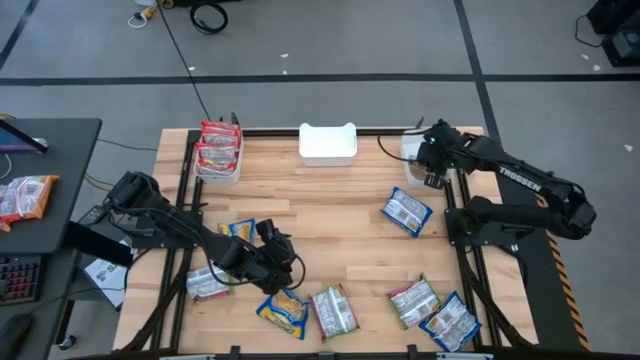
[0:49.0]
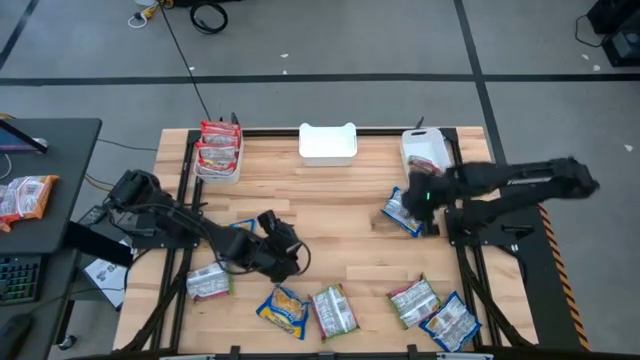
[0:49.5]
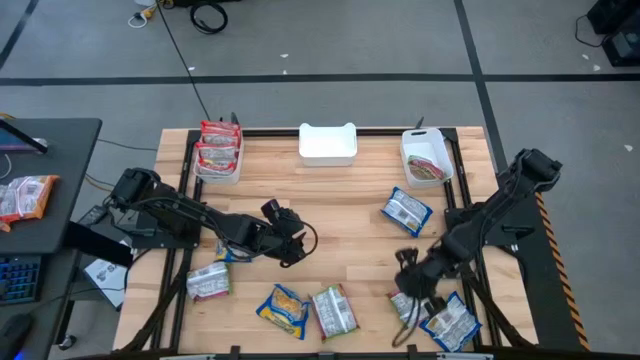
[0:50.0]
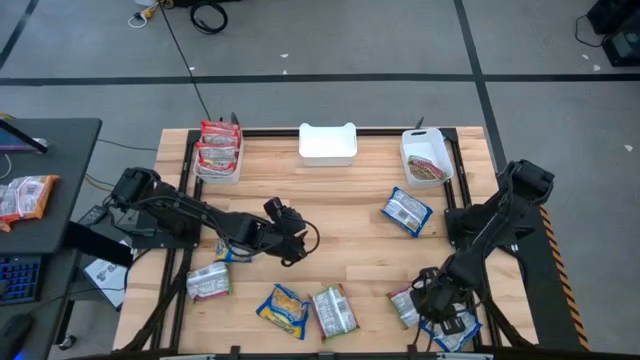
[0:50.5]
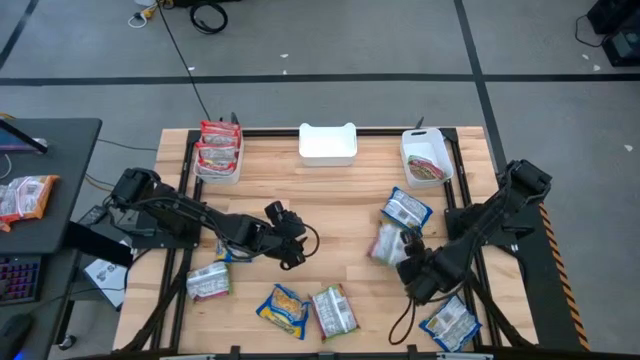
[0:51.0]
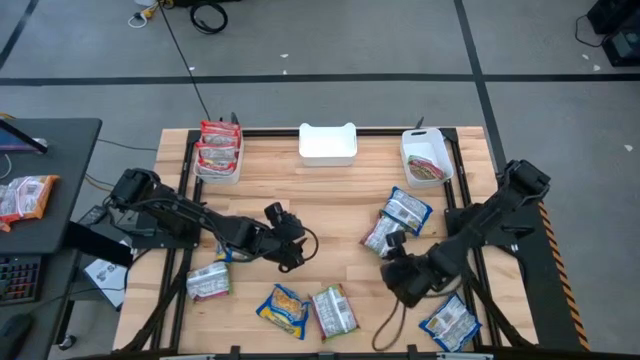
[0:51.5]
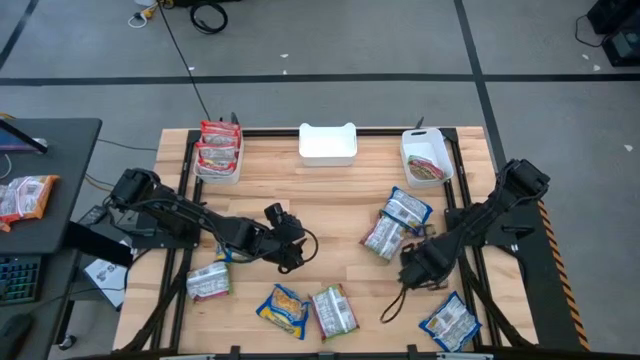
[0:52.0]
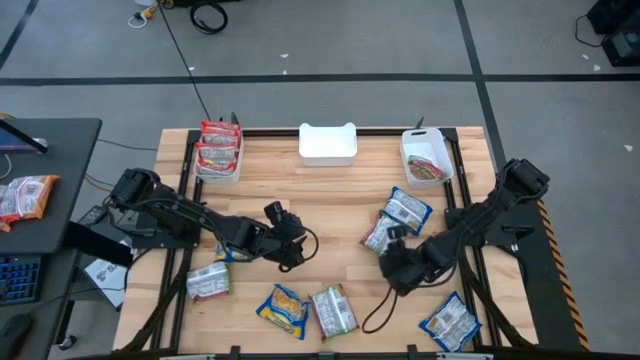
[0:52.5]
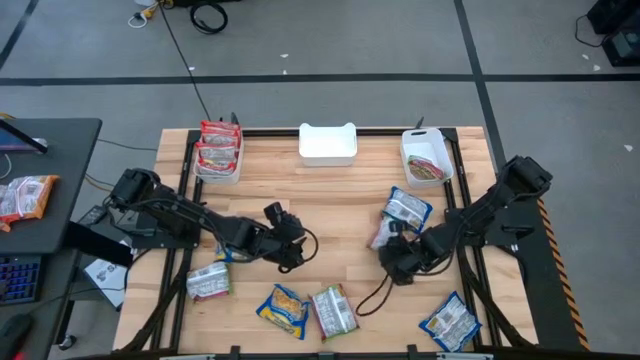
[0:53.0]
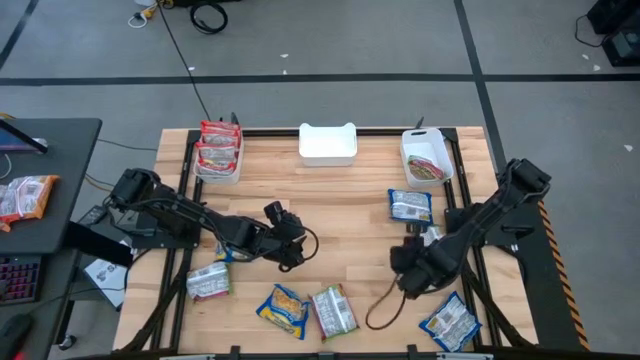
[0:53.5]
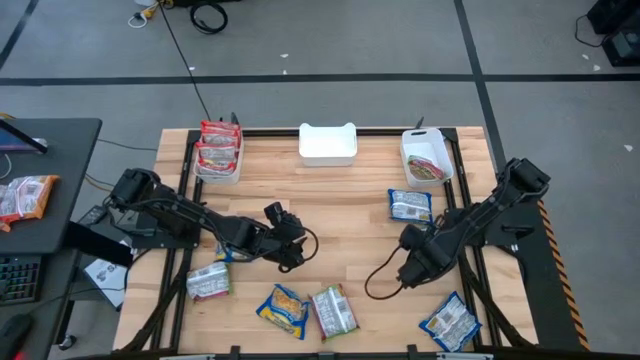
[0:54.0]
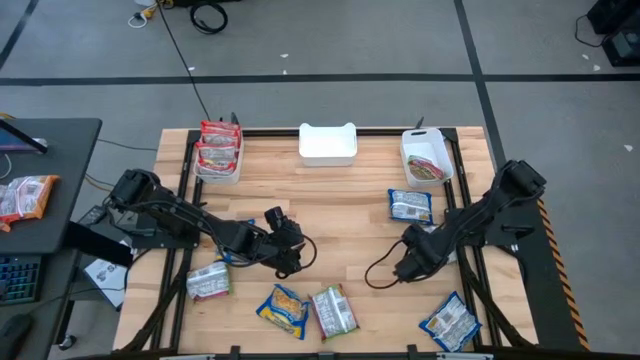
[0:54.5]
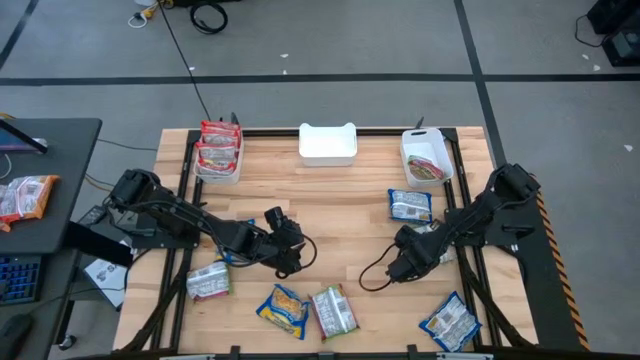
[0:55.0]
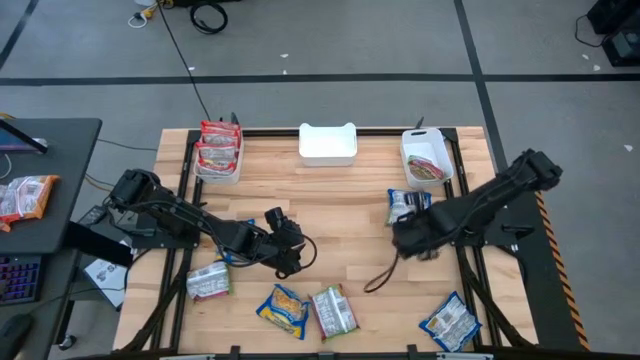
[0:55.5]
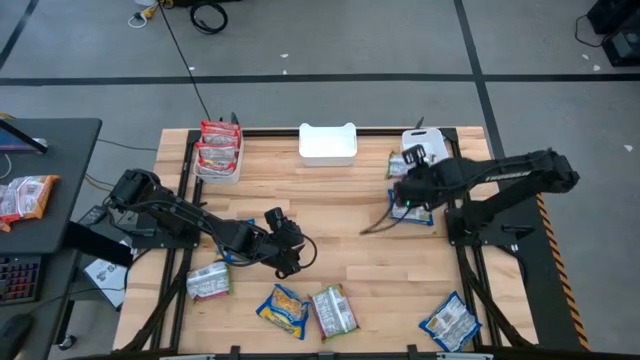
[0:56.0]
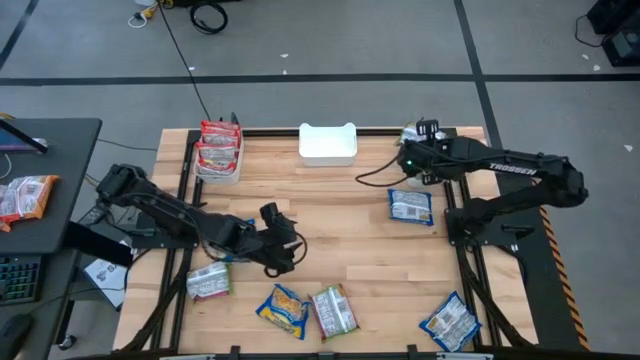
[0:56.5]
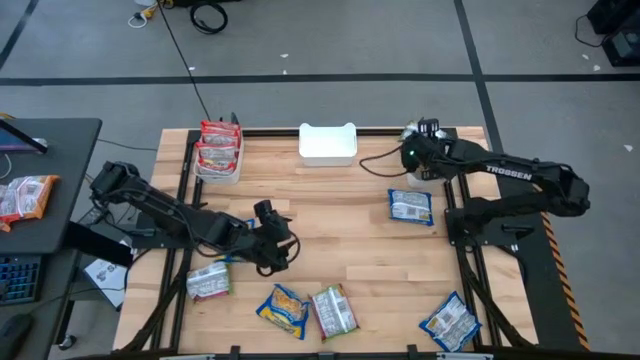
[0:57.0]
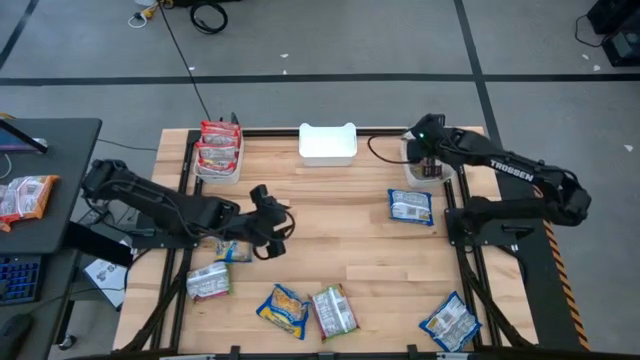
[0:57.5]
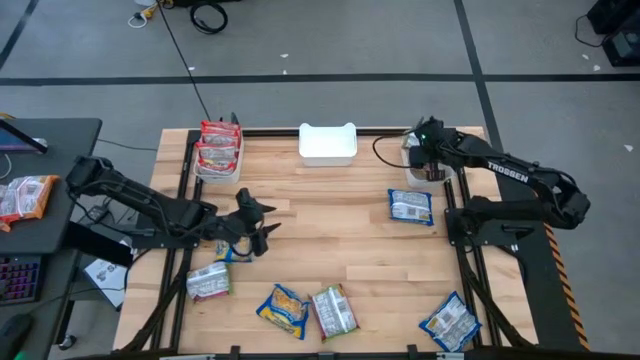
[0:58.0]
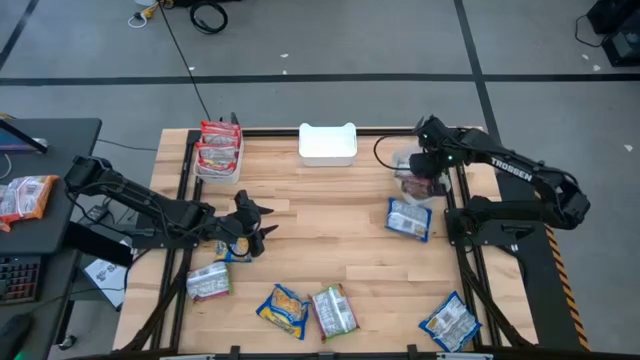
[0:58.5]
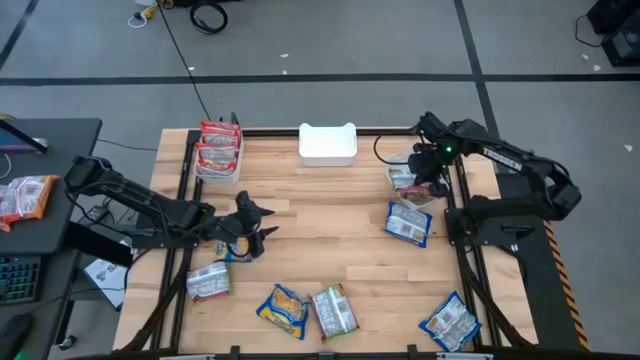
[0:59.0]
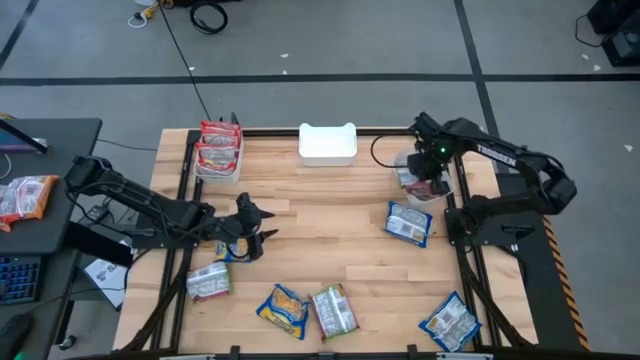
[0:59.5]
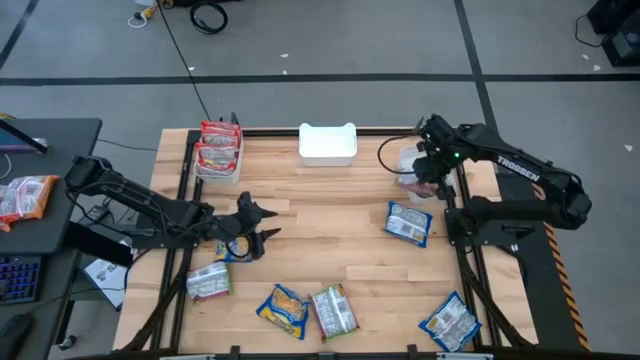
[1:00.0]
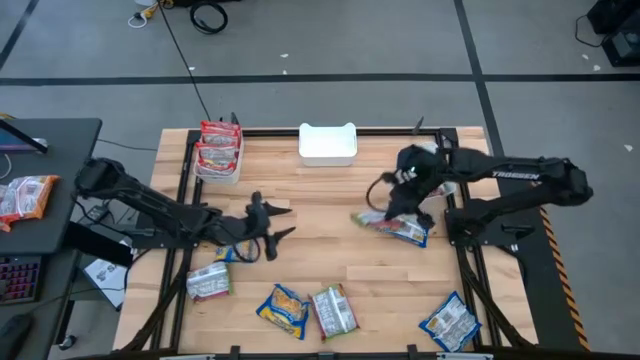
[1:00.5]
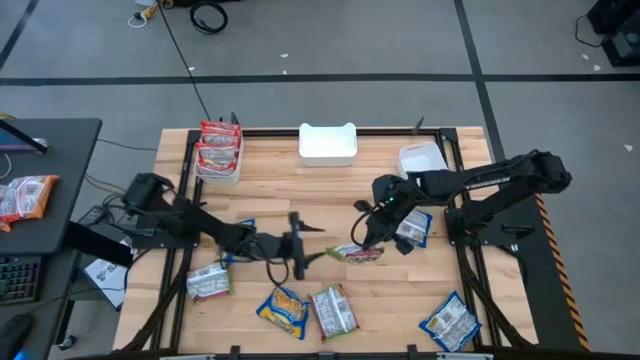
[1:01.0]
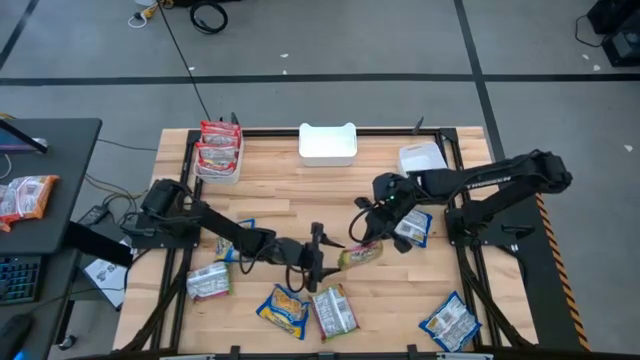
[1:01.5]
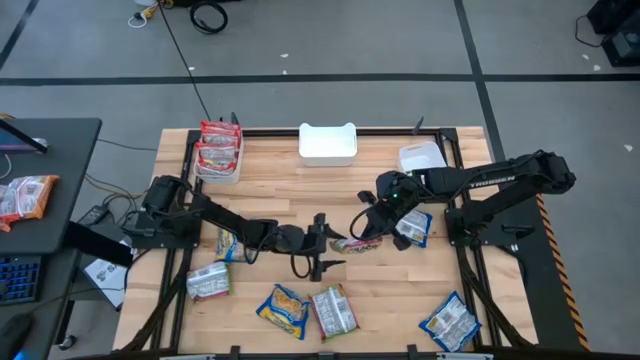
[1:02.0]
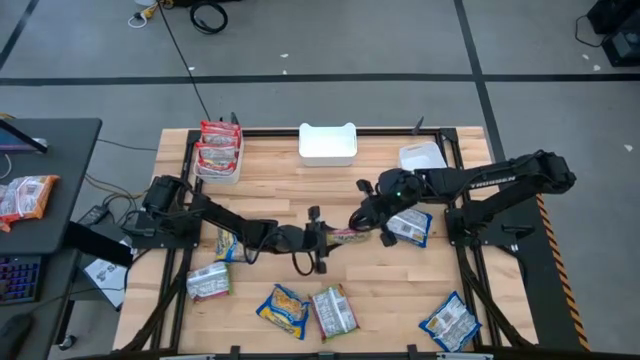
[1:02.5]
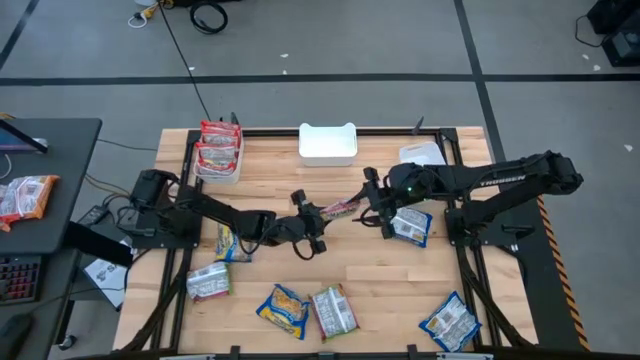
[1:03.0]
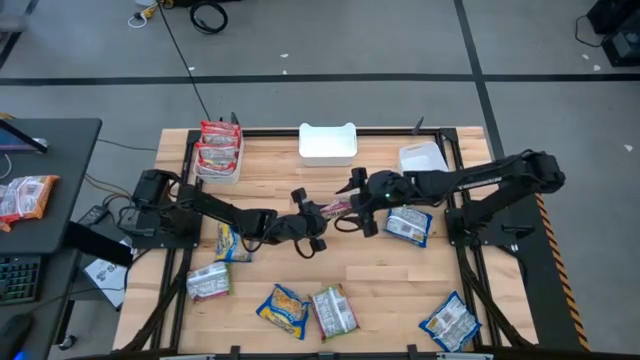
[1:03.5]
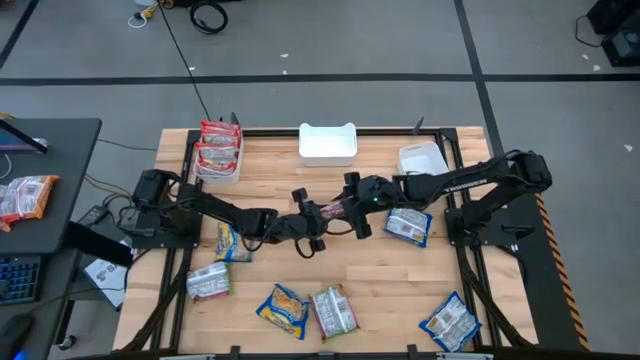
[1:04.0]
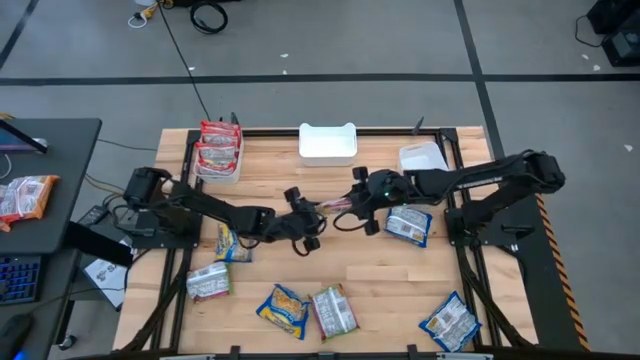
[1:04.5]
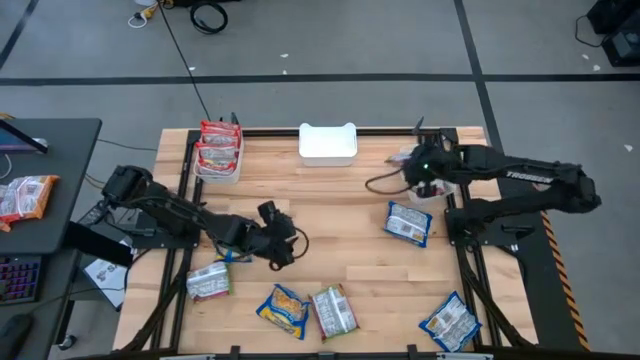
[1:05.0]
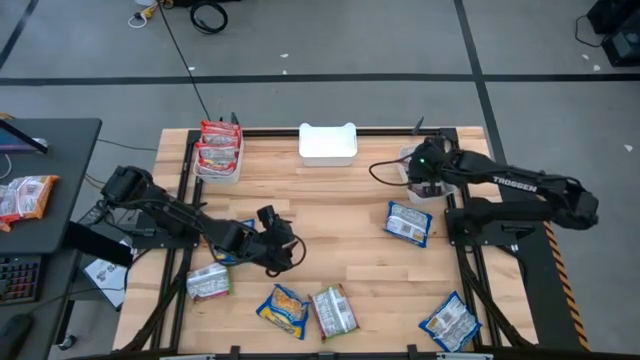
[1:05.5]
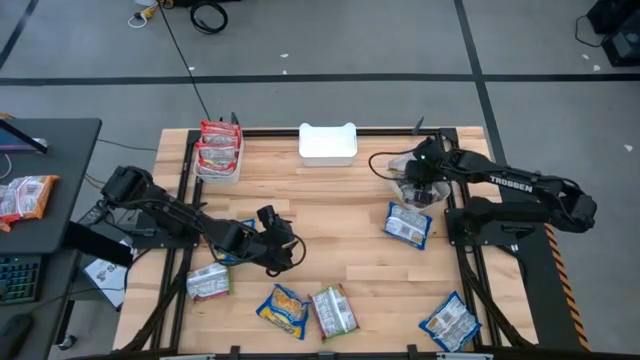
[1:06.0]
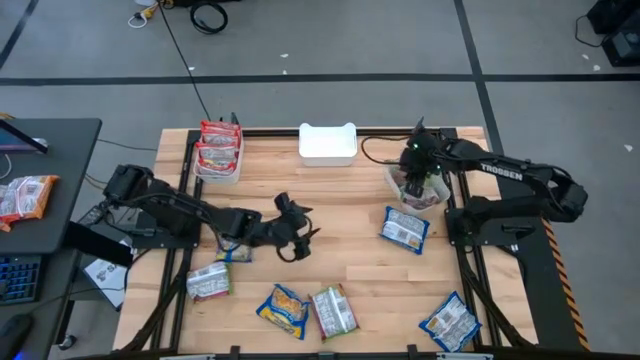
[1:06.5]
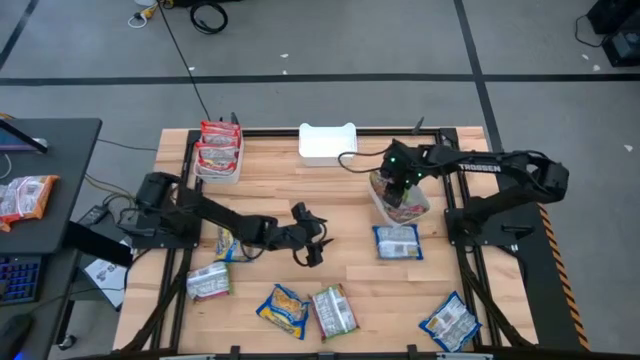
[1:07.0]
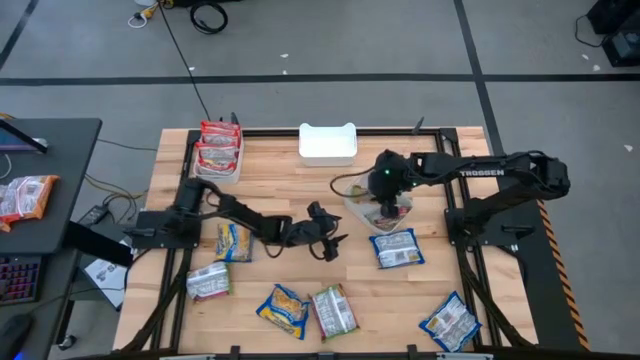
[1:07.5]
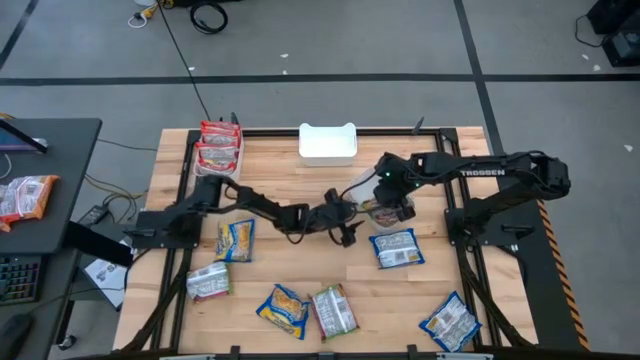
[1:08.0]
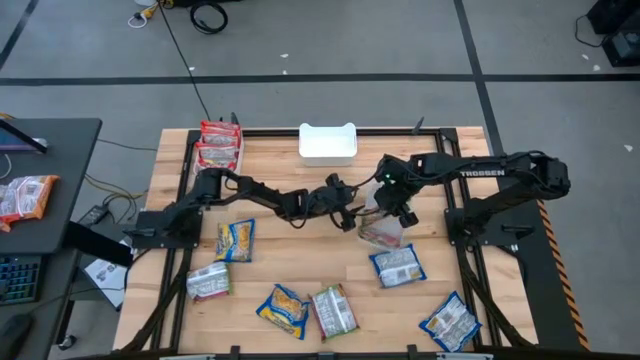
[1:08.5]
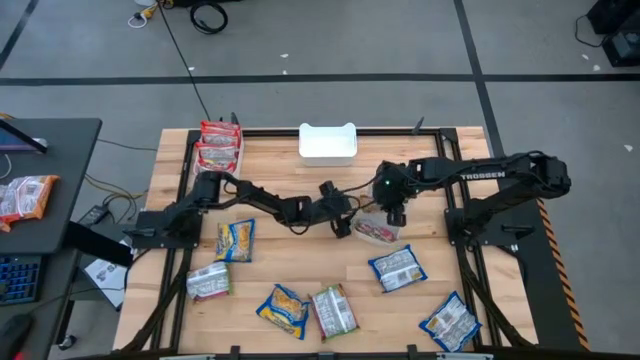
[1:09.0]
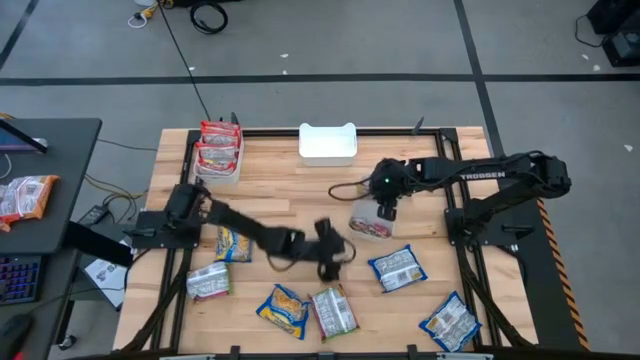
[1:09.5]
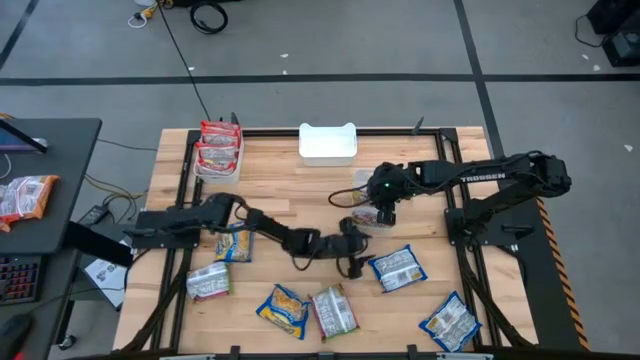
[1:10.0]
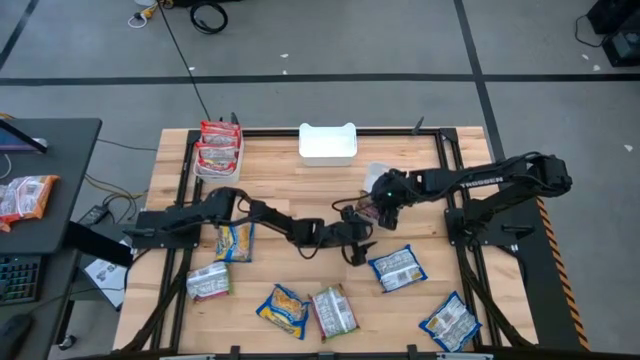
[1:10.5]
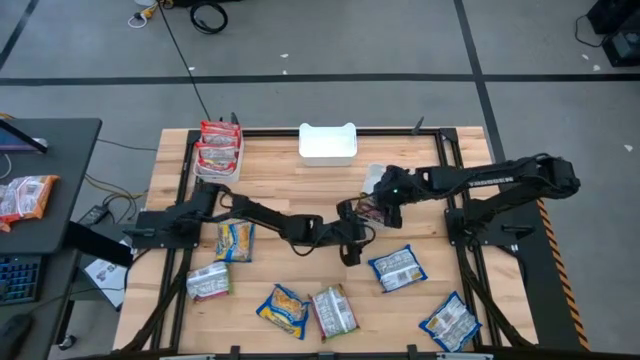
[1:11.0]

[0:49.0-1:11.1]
Task: Sort Maruchan noodles
Put the green noodle pack into the right white bin
